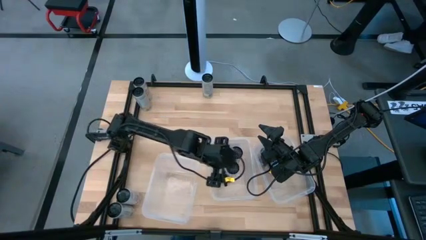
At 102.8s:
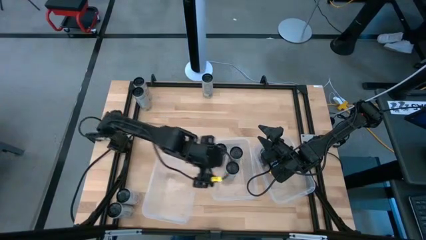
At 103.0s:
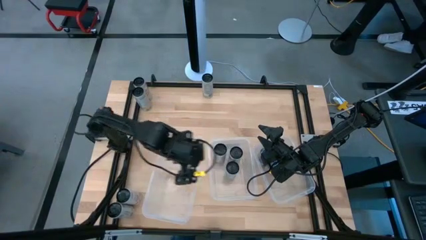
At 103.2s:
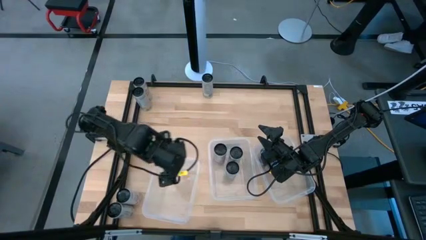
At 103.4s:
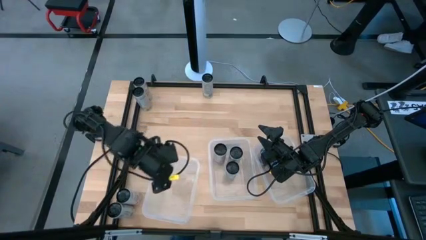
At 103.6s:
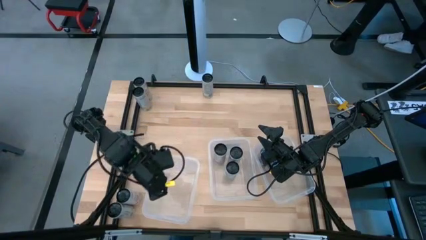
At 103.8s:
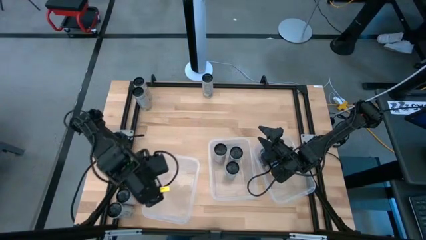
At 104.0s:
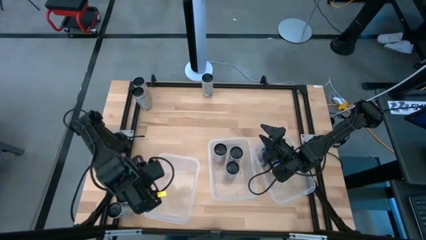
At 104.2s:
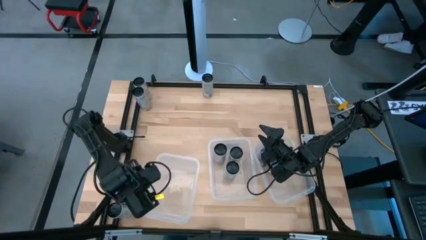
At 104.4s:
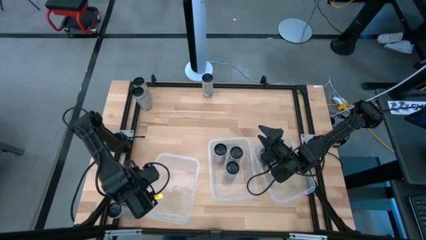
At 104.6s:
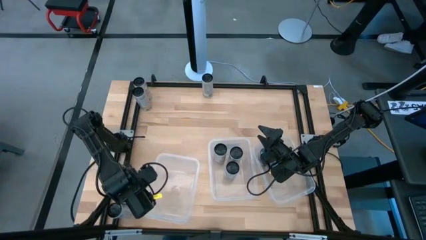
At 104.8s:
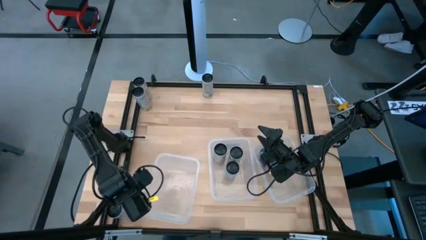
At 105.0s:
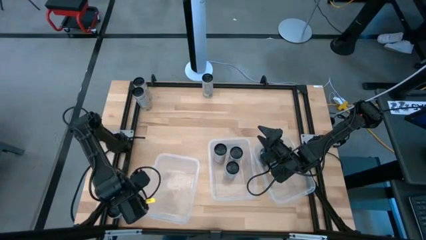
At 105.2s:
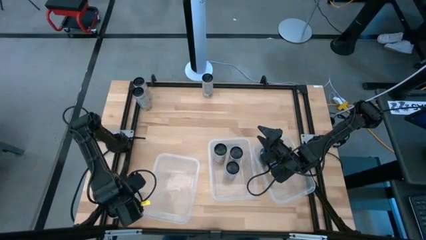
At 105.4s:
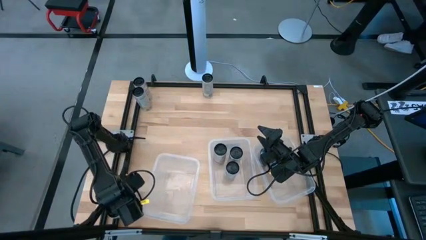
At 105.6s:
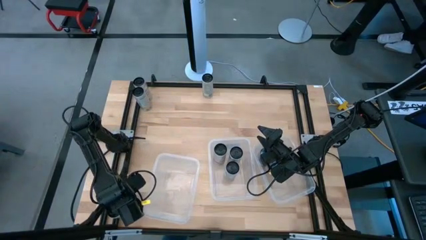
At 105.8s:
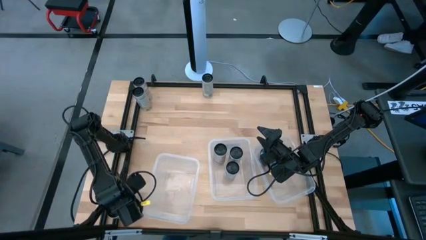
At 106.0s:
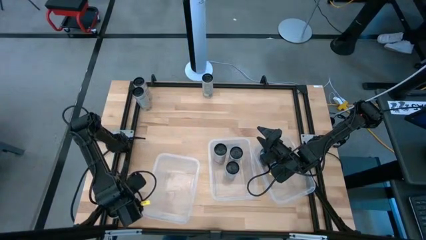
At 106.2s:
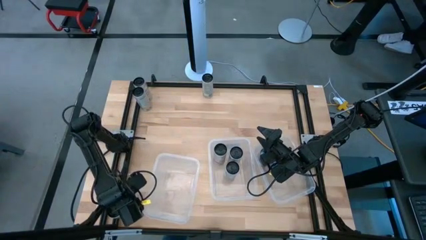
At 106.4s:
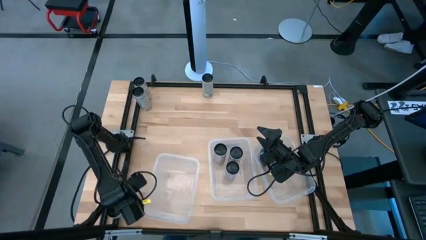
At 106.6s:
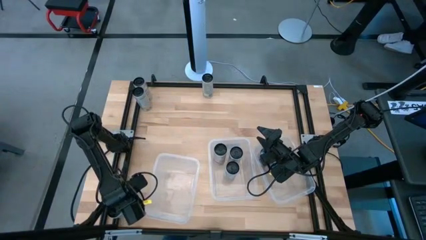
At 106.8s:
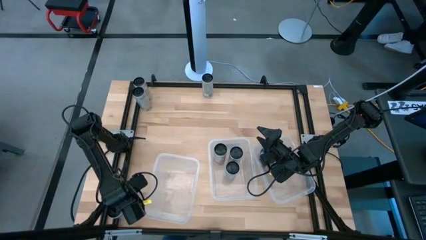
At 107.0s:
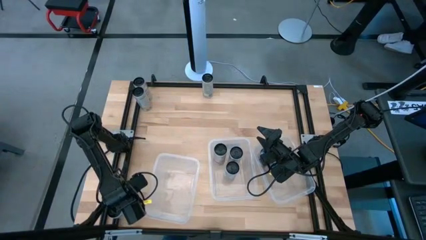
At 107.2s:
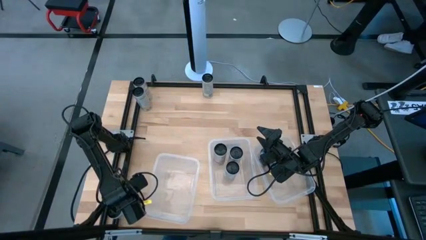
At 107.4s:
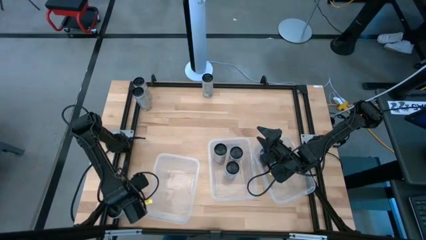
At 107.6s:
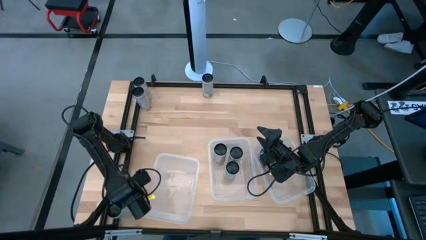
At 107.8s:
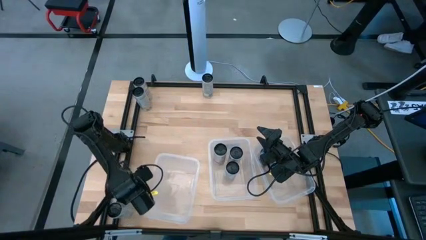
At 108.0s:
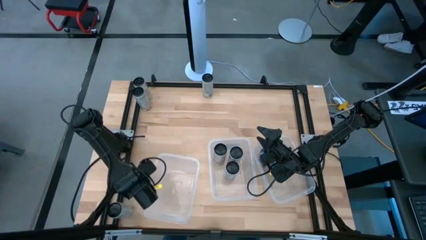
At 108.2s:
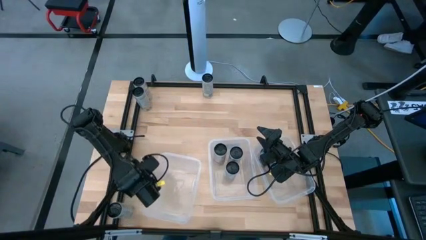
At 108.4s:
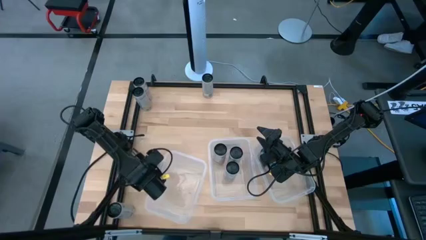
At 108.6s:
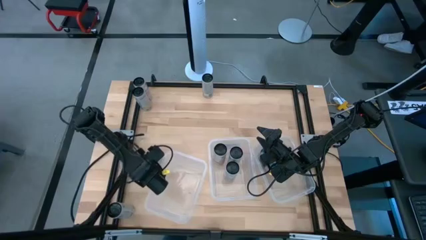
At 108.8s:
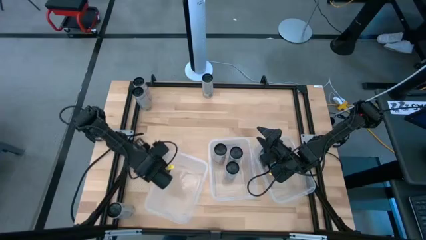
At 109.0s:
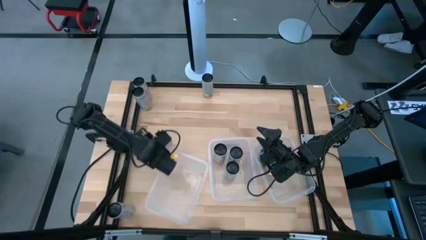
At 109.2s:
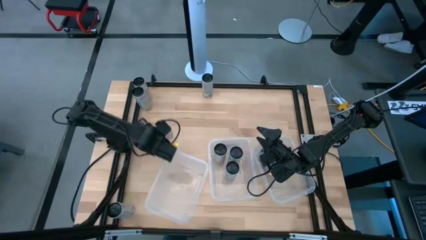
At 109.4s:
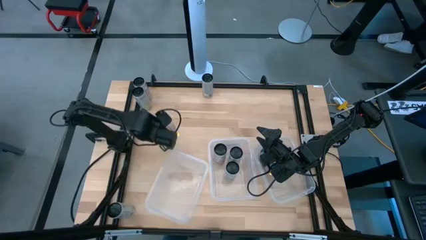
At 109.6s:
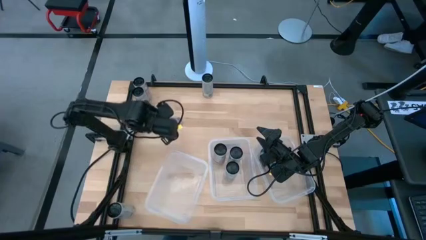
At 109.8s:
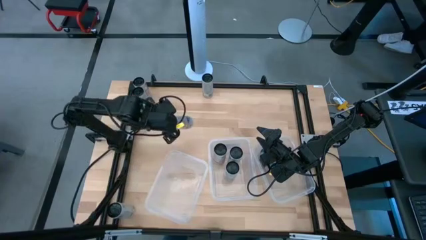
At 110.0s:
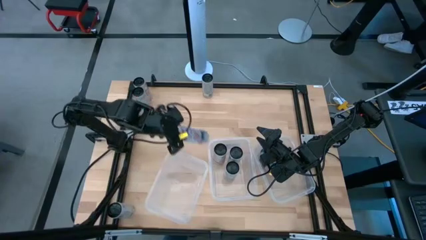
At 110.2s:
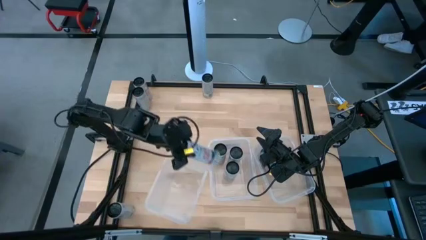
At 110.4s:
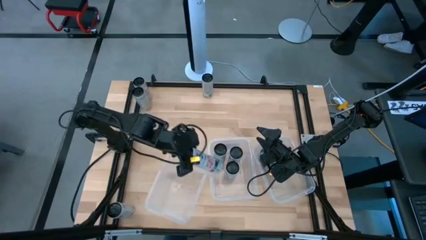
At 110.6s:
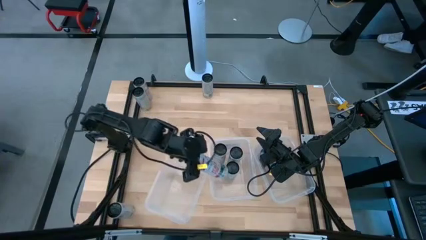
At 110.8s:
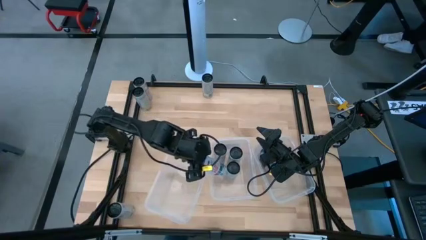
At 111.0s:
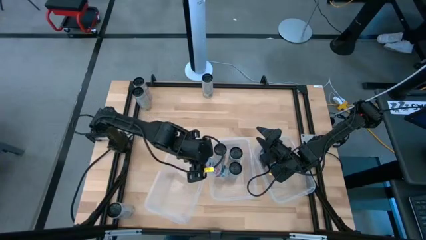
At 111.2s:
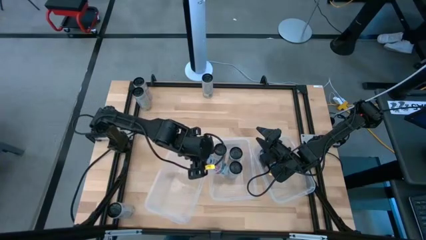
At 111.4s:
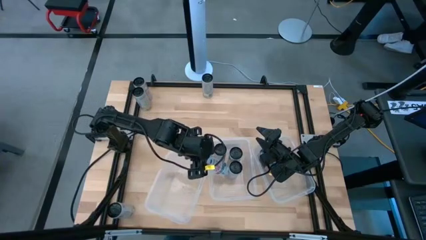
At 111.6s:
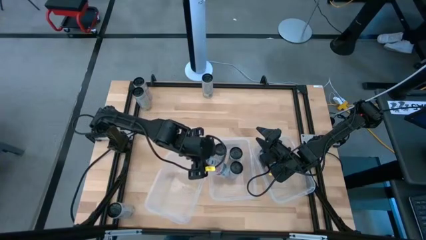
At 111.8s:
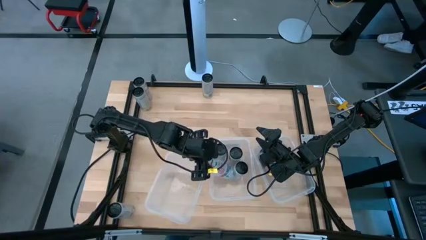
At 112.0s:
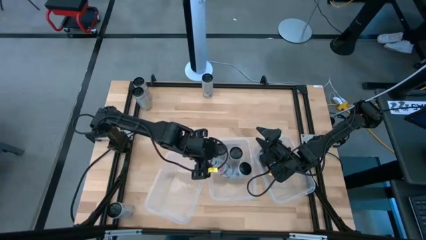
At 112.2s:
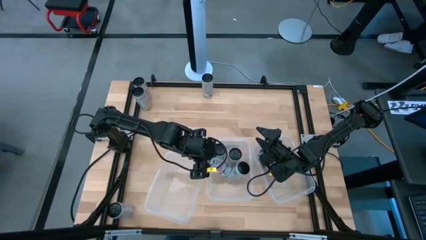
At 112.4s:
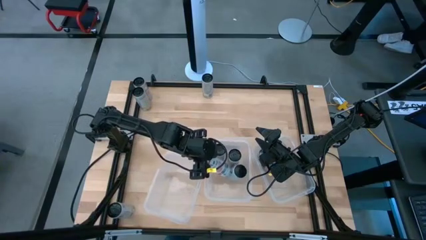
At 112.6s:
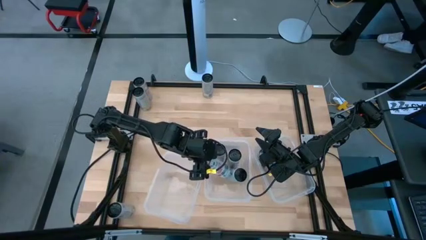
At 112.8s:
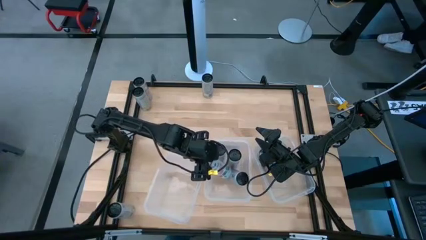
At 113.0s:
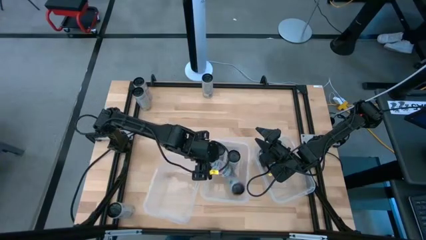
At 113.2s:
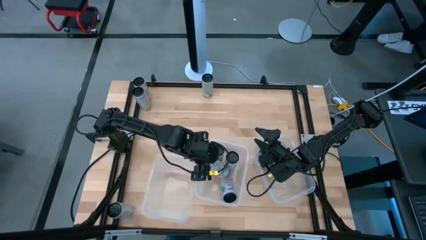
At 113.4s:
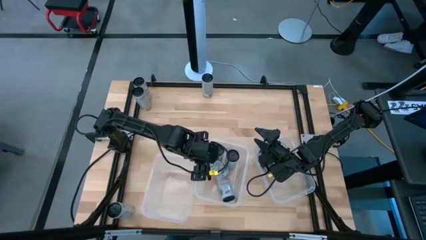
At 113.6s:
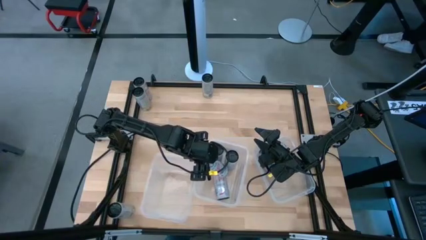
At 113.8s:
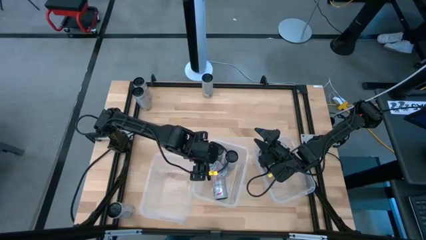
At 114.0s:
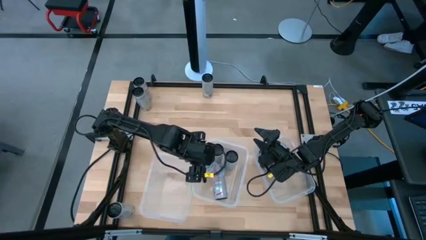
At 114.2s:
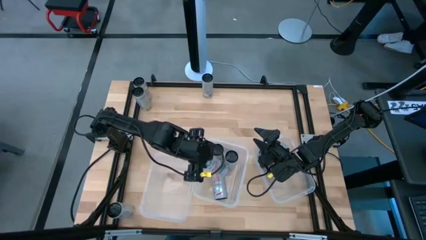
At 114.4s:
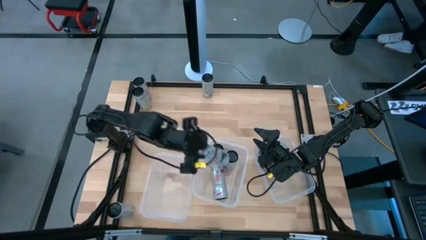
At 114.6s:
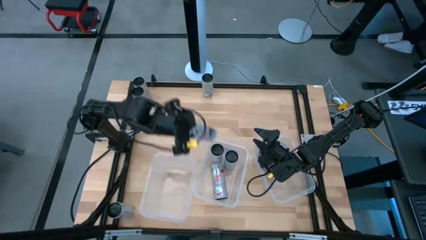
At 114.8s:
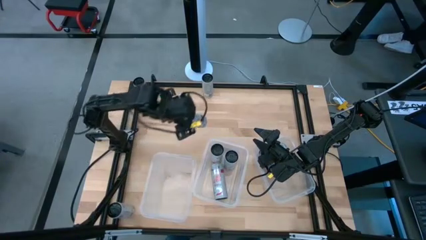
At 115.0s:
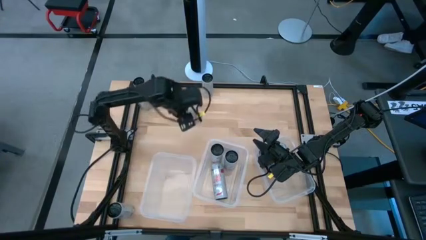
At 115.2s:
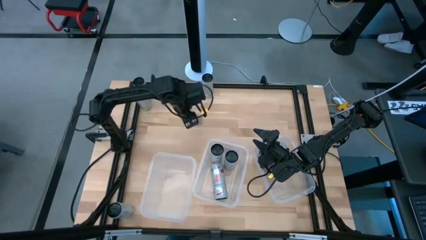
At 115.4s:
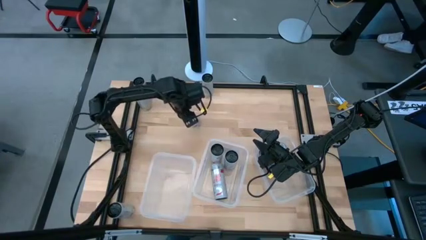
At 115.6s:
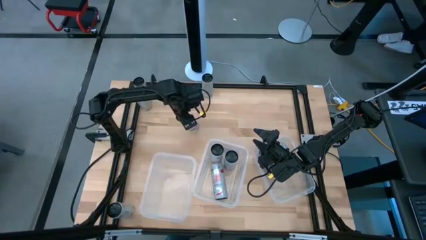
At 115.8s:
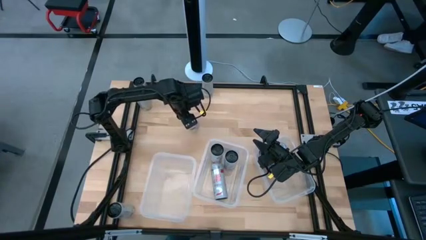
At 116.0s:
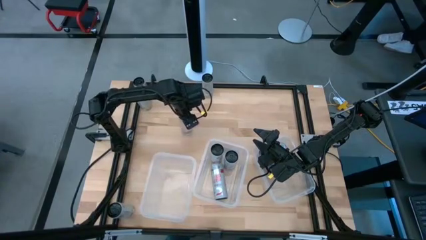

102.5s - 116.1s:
Task: Sort soda cans
Put the white-pink soda can into the middle transparent bin
